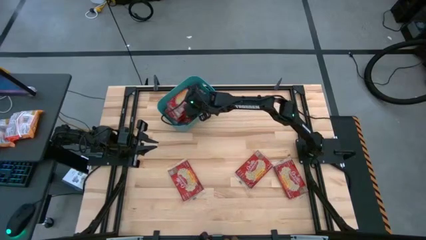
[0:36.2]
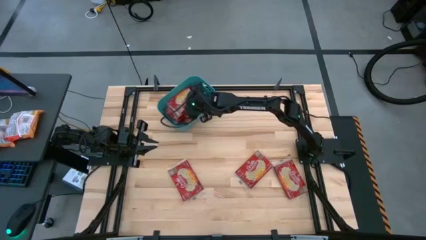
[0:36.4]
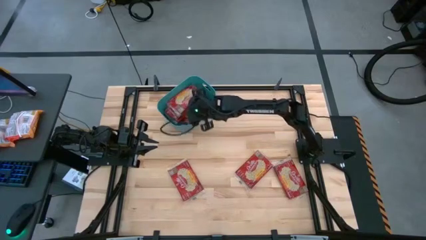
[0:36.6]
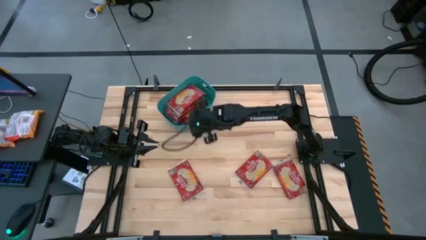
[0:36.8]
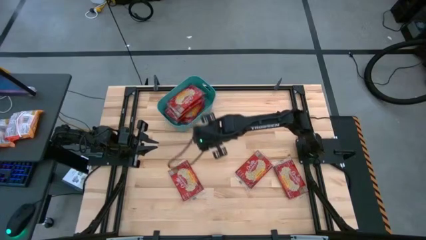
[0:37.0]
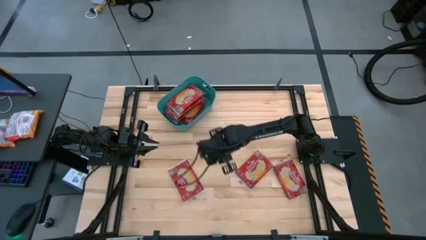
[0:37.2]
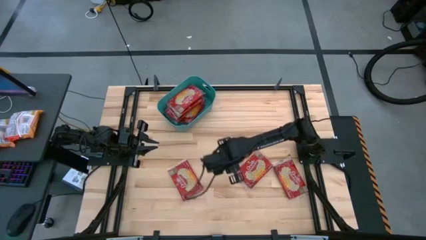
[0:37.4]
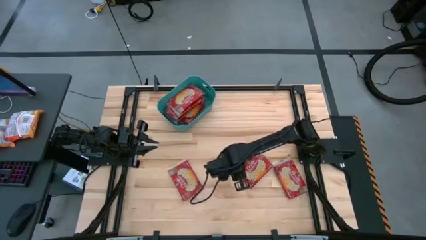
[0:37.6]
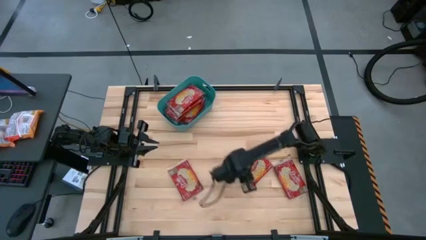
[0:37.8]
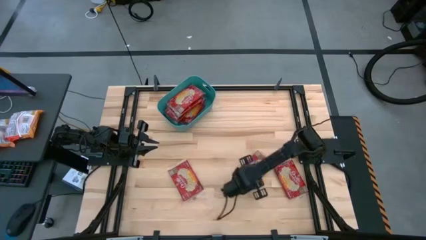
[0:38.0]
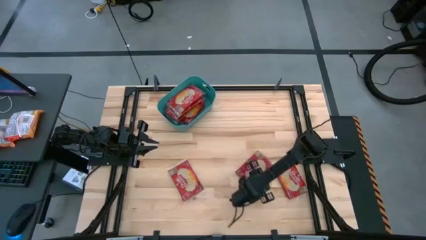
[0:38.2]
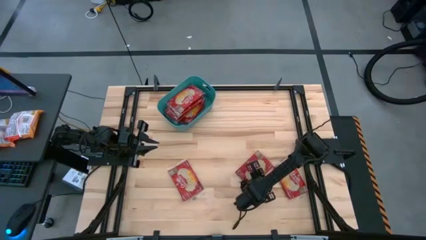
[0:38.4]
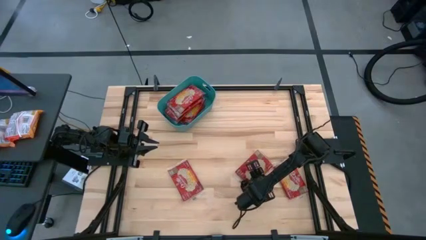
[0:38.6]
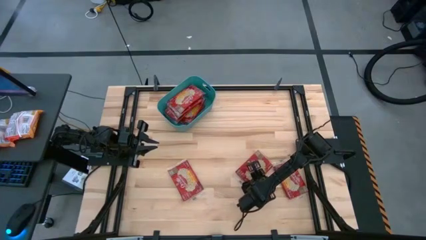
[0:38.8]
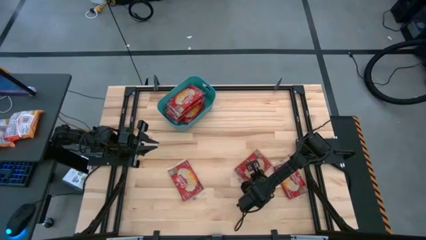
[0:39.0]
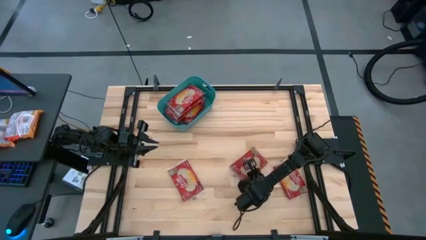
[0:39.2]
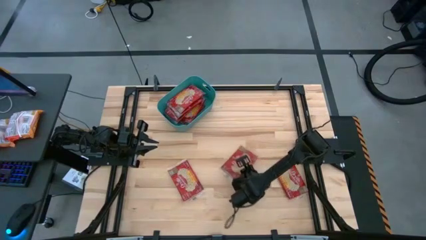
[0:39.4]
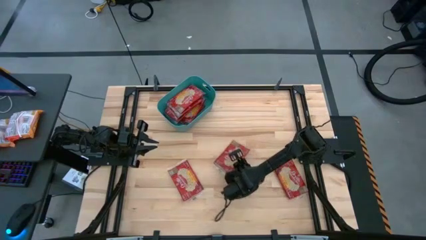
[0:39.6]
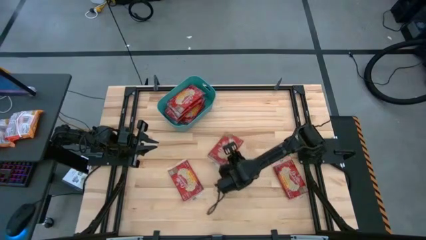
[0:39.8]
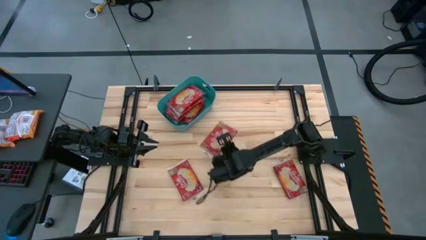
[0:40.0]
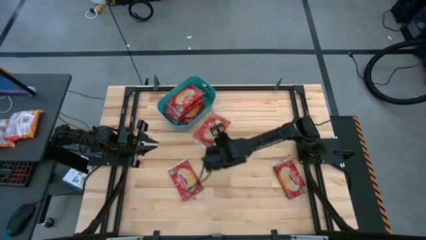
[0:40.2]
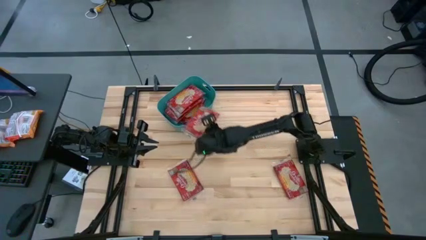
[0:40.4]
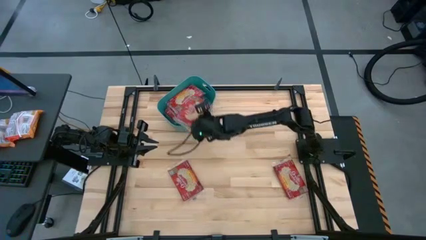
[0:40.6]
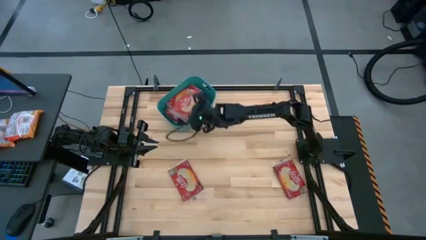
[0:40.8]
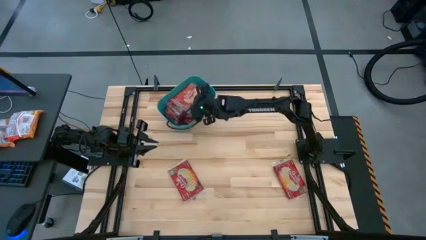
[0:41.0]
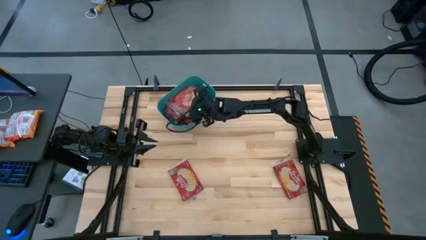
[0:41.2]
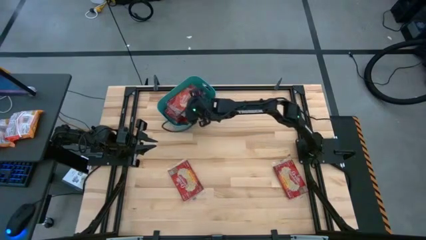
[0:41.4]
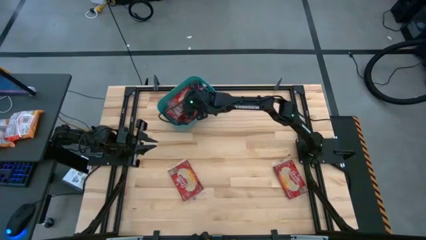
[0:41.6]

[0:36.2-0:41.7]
Task: Sort popcorn bags into baskets
Put the red popcorn bag into the green bin

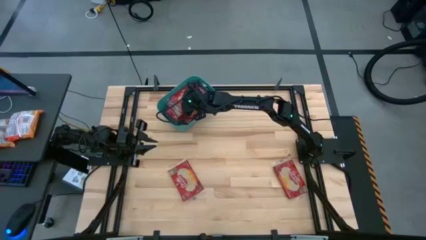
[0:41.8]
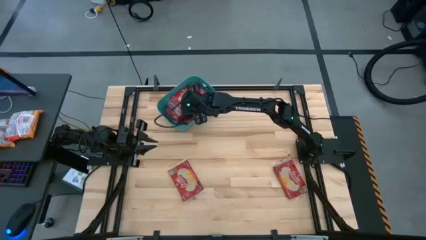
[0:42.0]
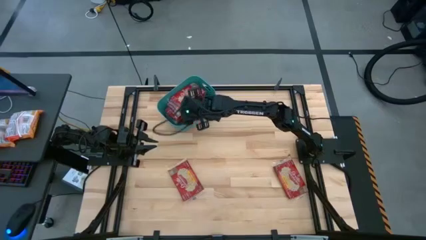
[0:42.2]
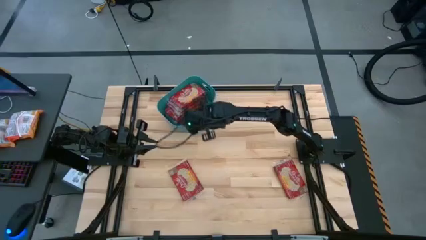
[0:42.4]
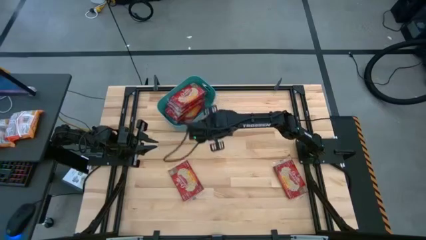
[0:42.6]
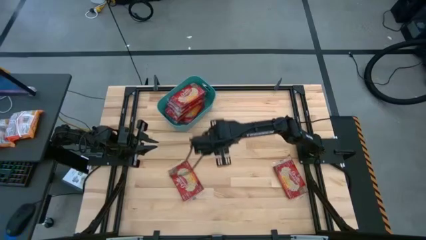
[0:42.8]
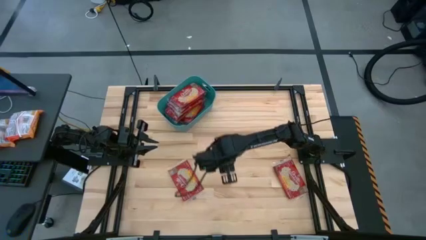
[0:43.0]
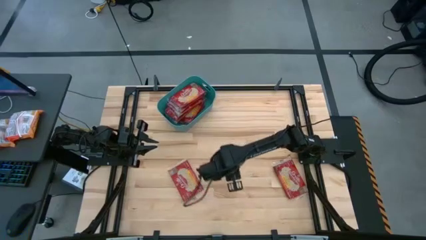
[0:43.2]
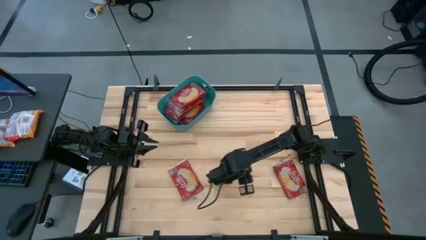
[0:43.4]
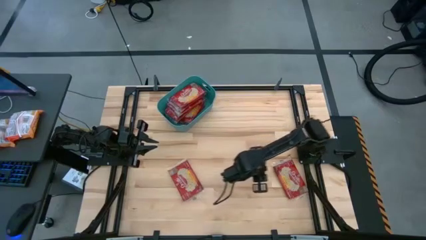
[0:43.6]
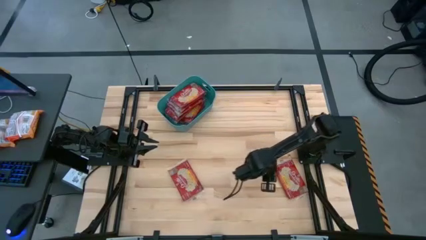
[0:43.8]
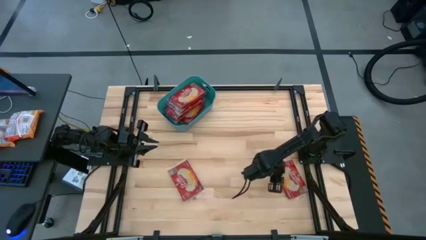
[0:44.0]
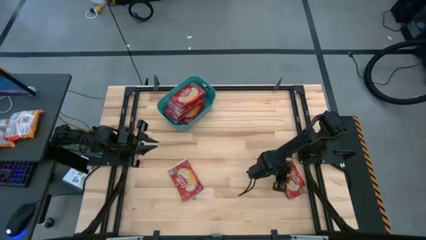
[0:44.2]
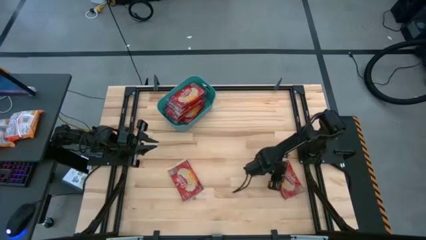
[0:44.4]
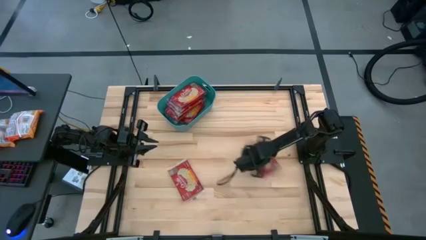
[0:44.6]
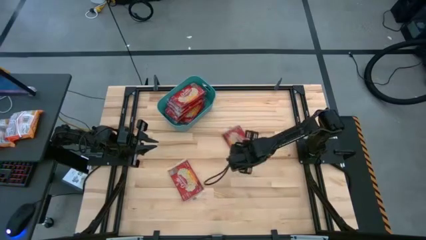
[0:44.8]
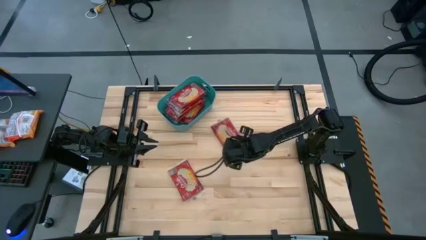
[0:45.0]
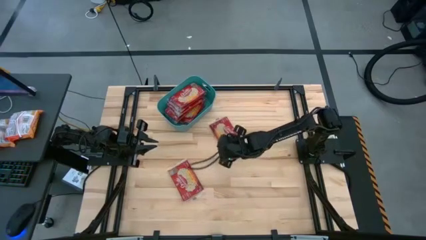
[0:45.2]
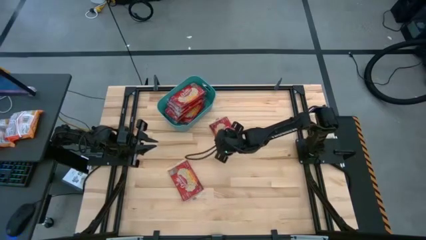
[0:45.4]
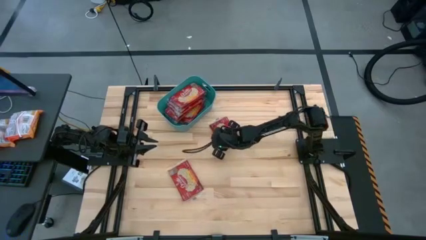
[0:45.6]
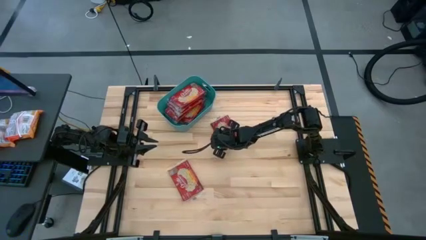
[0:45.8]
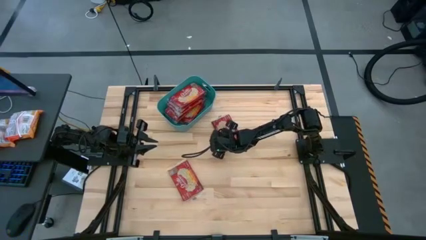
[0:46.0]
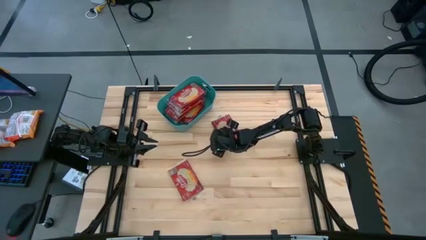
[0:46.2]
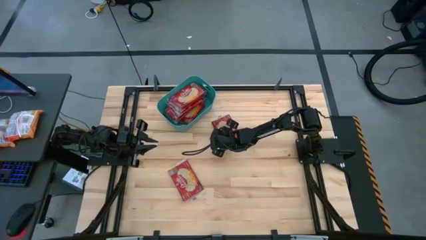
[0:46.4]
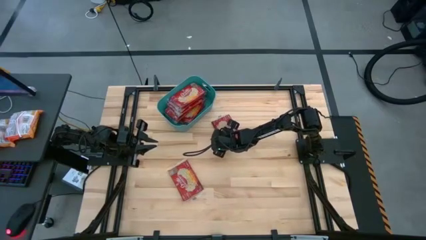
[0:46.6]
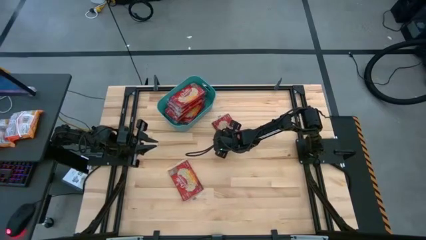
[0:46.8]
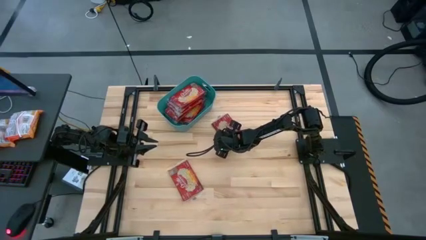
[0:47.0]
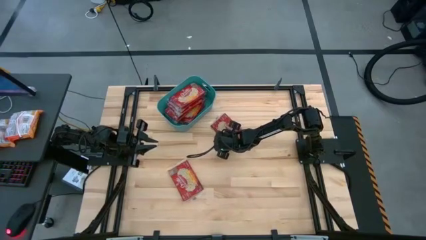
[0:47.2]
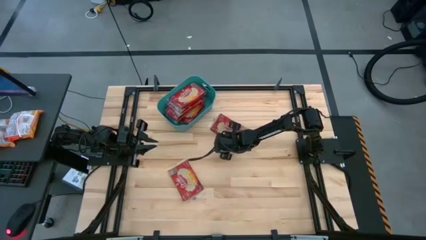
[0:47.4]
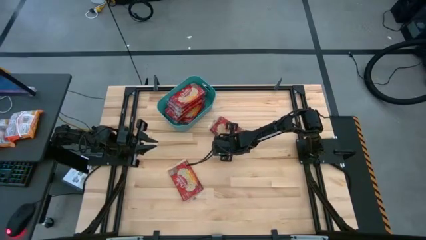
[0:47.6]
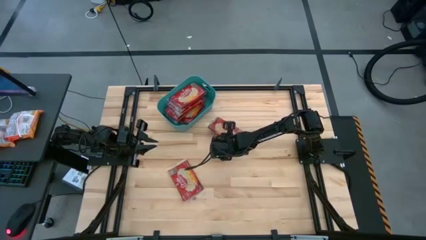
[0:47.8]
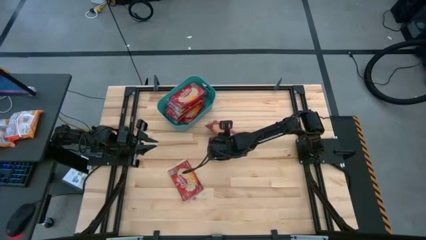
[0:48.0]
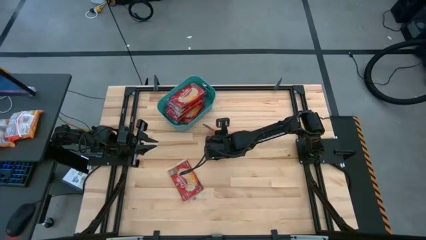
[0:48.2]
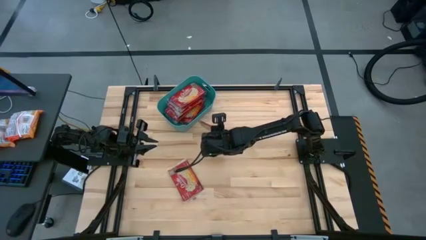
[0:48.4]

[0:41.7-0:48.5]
Put the red popcorn bag into the green bin

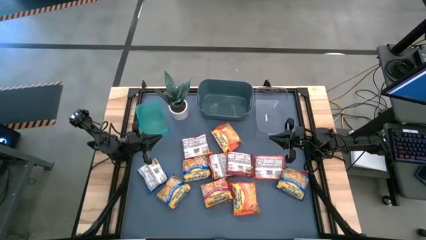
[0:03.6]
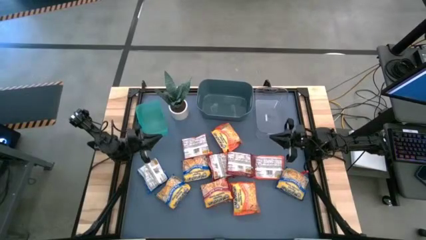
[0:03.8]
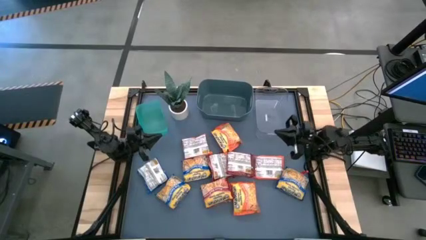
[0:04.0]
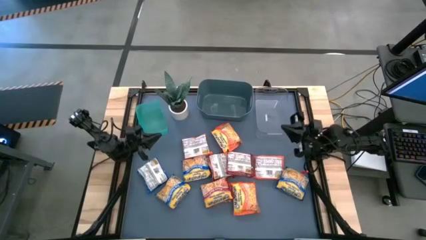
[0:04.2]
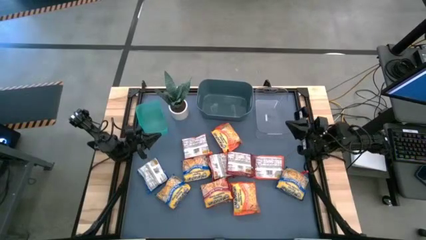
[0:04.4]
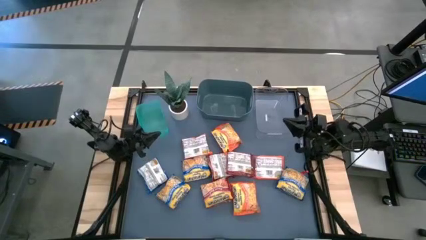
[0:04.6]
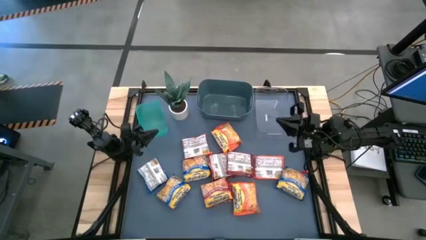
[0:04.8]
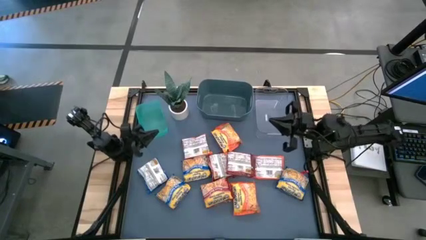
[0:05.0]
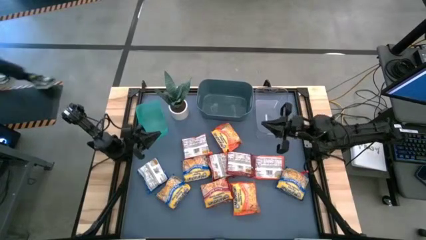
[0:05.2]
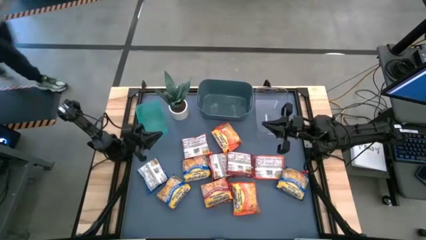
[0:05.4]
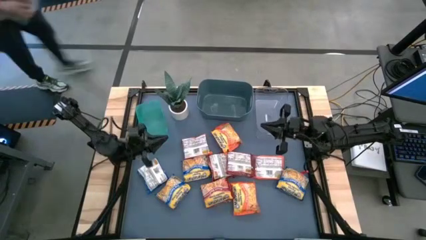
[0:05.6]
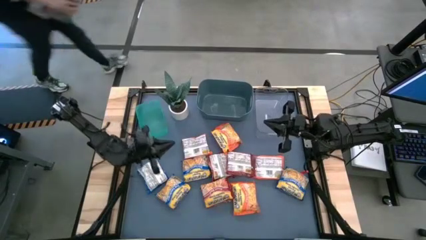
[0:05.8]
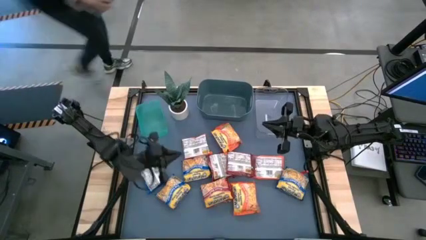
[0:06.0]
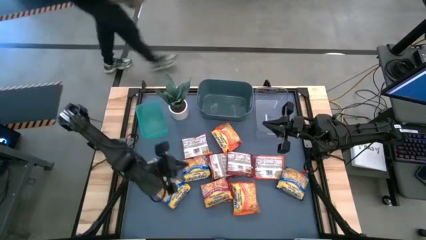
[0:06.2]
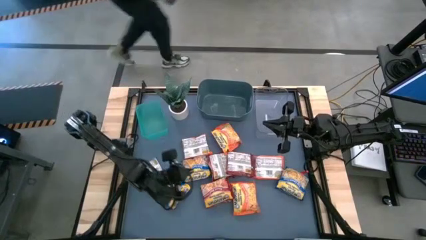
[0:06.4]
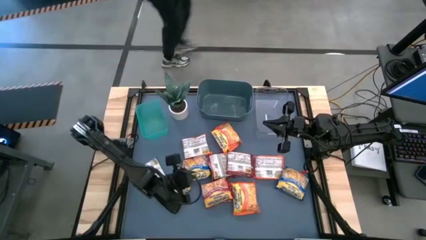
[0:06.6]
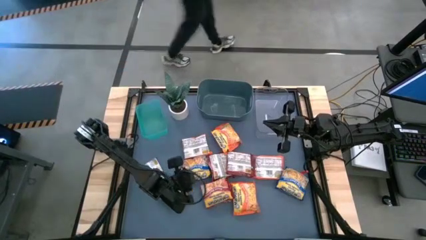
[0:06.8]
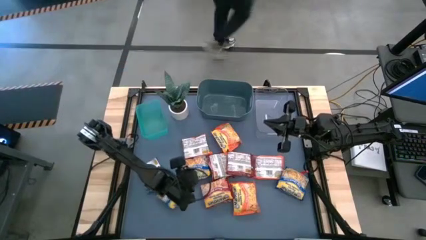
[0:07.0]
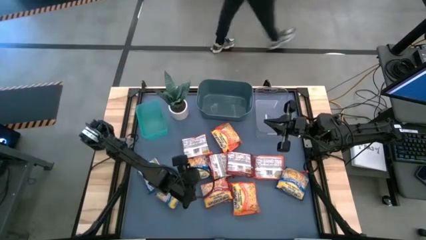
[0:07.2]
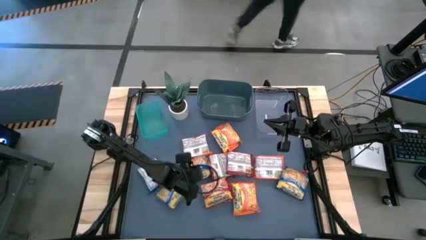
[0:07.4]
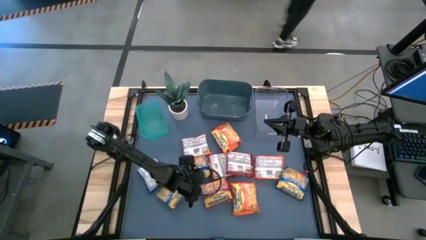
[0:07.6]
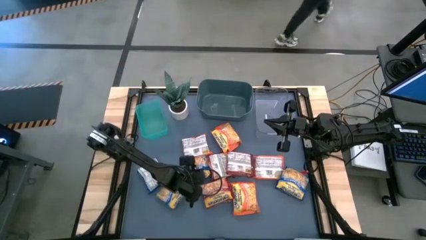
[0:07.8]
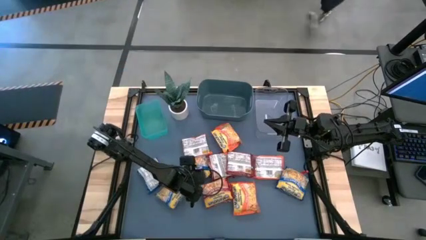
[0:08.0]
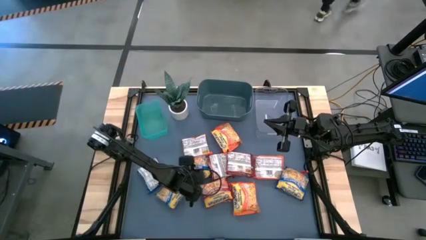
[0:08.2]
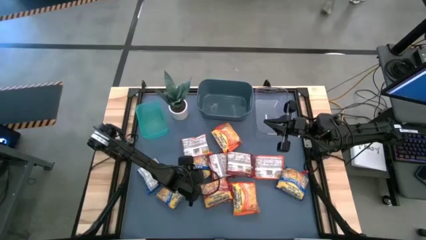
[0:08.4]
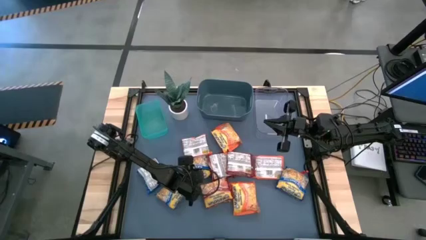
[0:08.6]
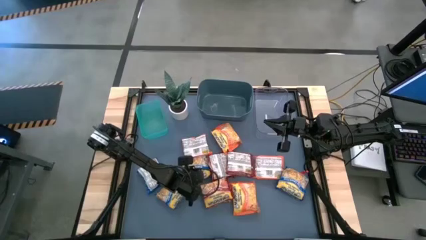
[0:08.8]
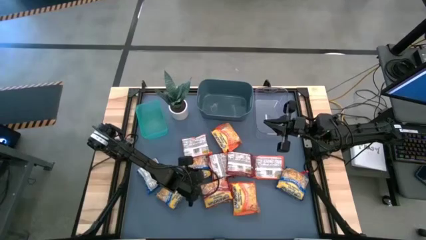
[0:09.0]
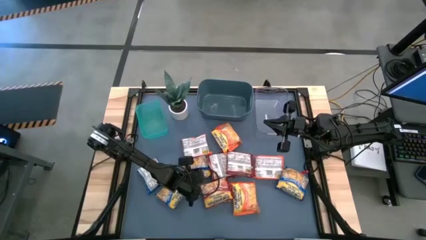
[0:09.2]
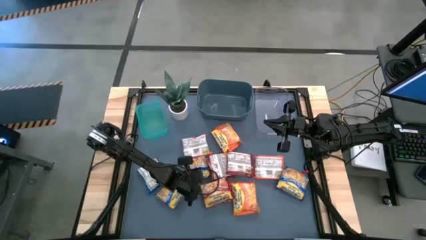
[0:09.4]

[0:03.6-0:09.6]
Task: Sort Maruchan noodles
Put the blue noodle pack into the green bin
